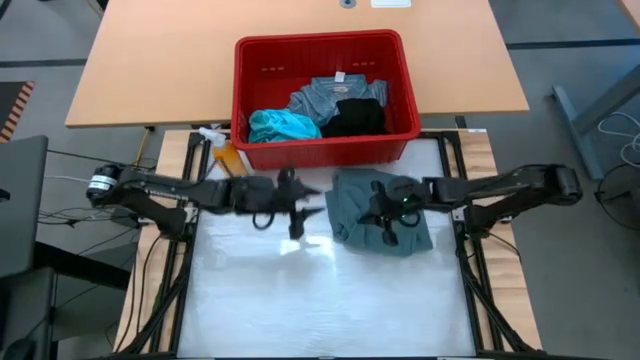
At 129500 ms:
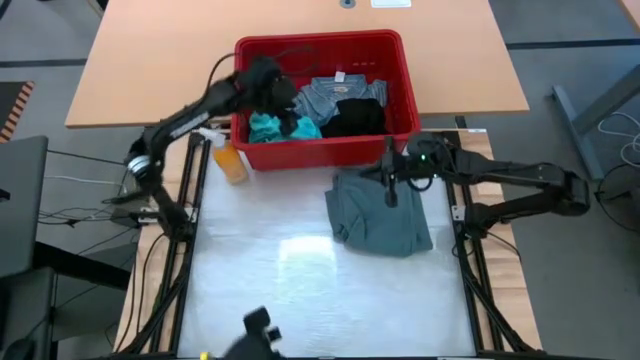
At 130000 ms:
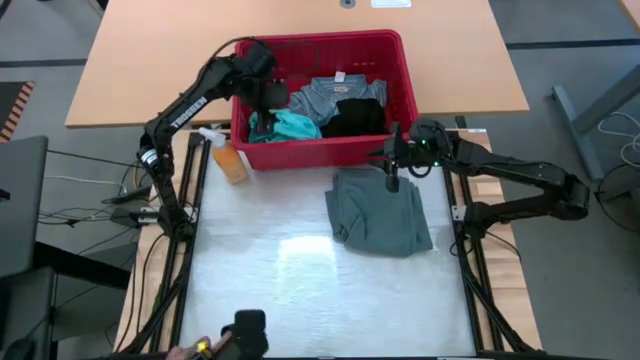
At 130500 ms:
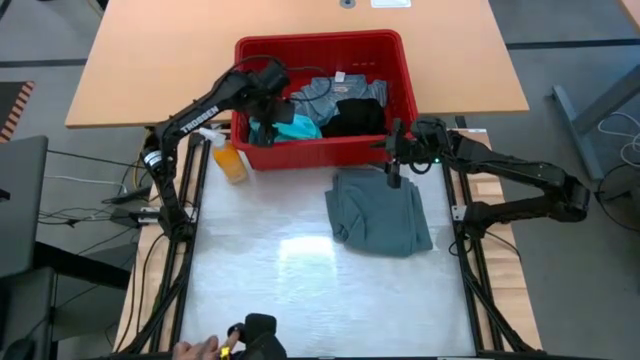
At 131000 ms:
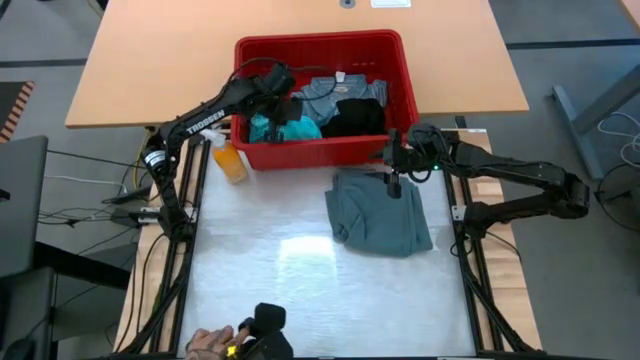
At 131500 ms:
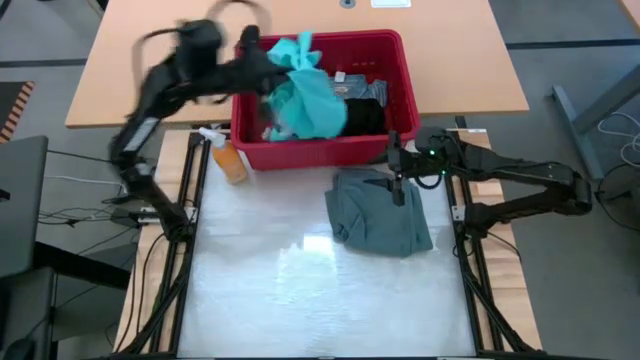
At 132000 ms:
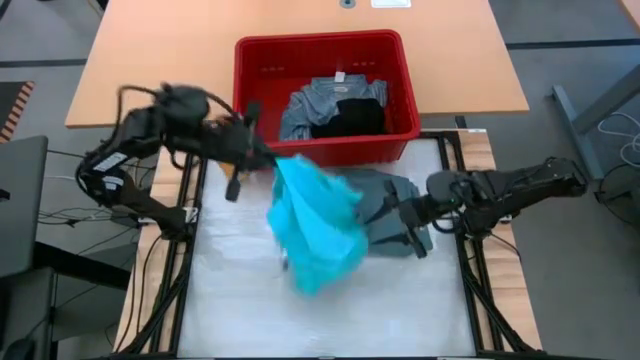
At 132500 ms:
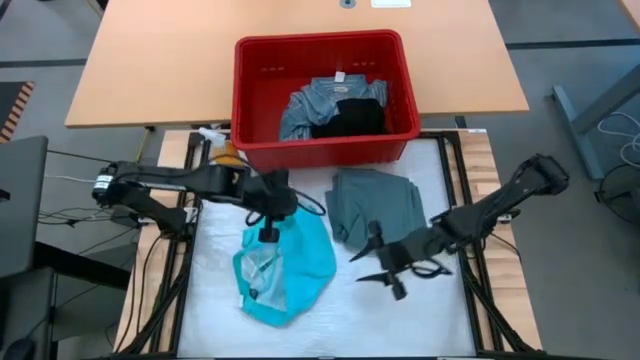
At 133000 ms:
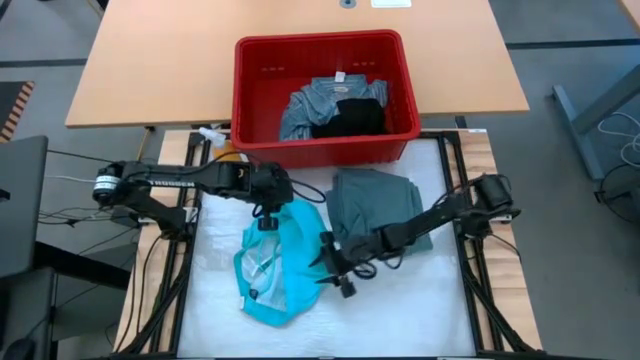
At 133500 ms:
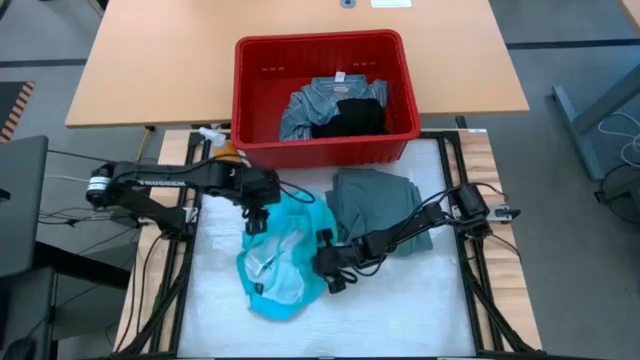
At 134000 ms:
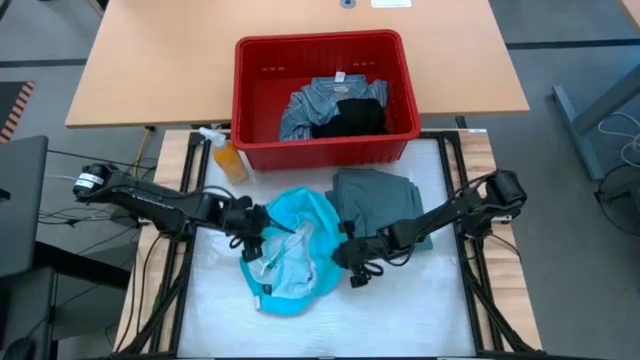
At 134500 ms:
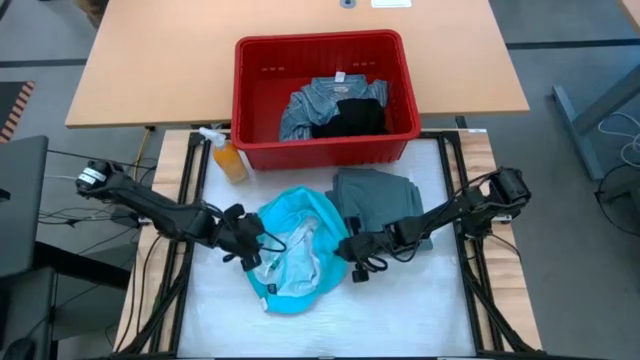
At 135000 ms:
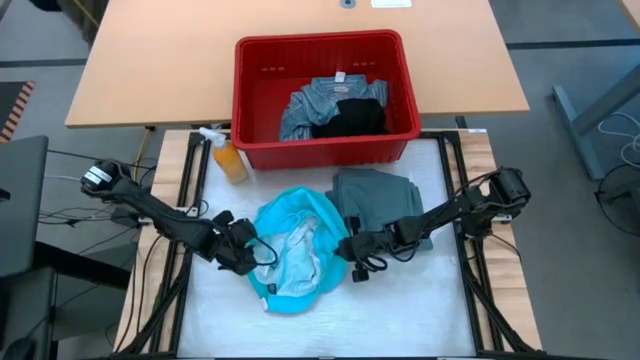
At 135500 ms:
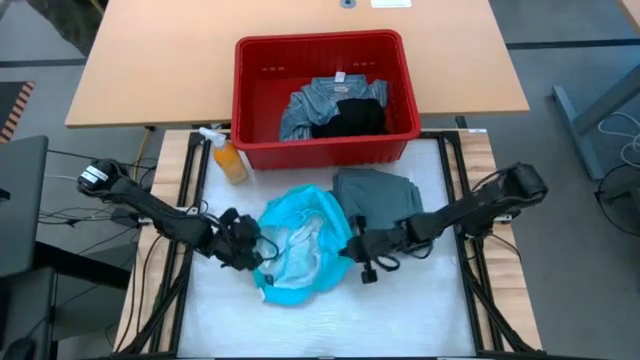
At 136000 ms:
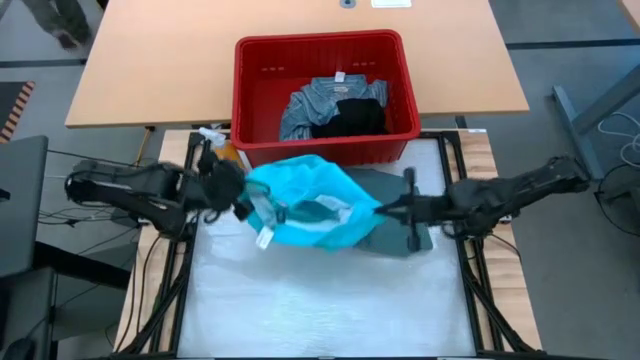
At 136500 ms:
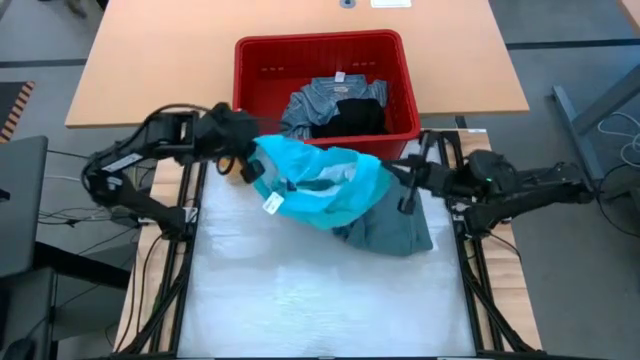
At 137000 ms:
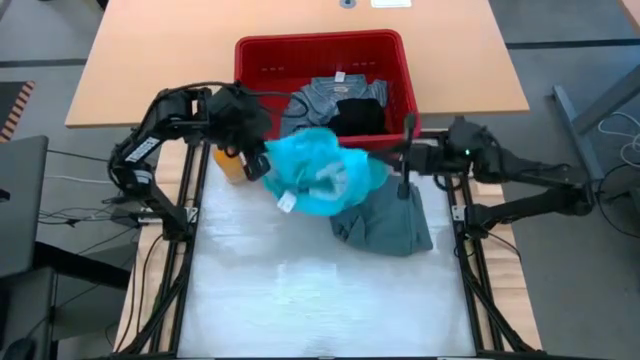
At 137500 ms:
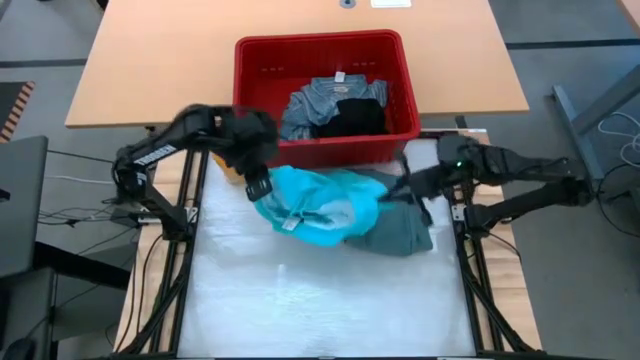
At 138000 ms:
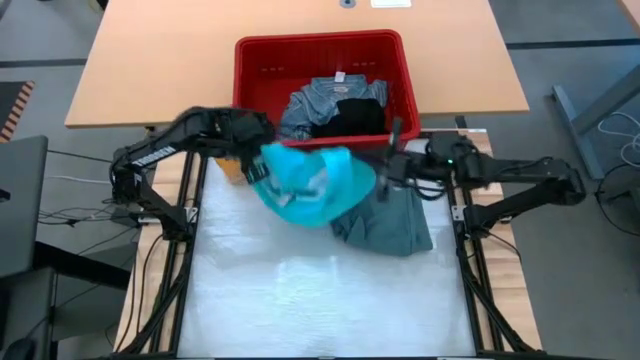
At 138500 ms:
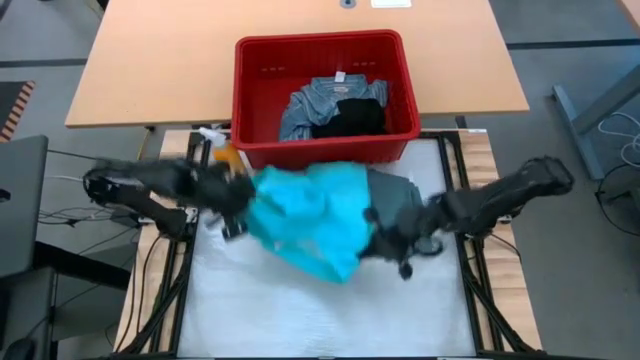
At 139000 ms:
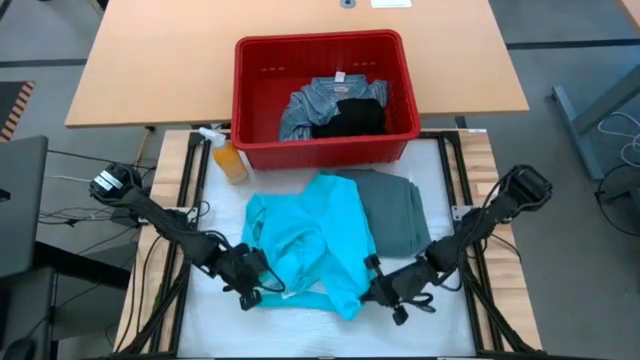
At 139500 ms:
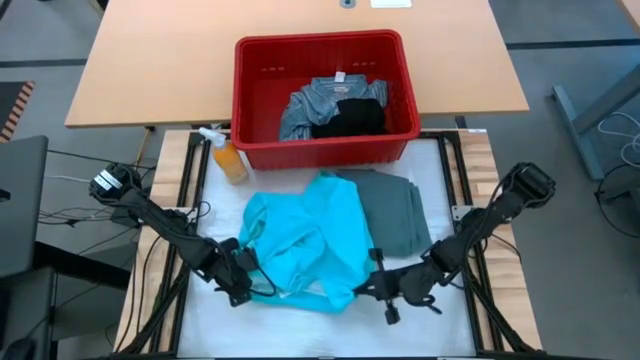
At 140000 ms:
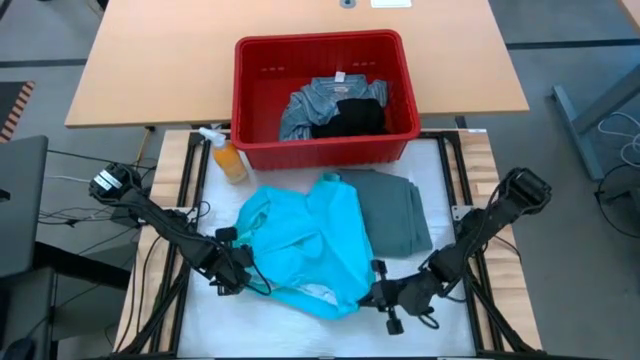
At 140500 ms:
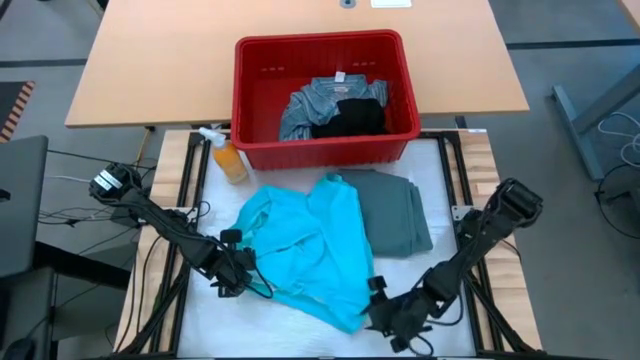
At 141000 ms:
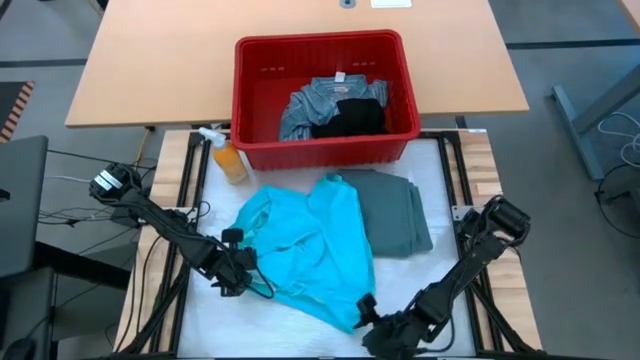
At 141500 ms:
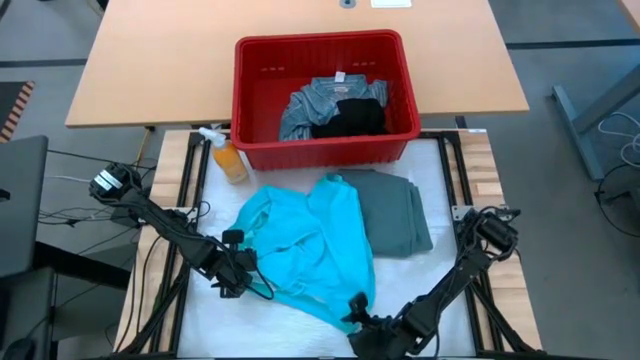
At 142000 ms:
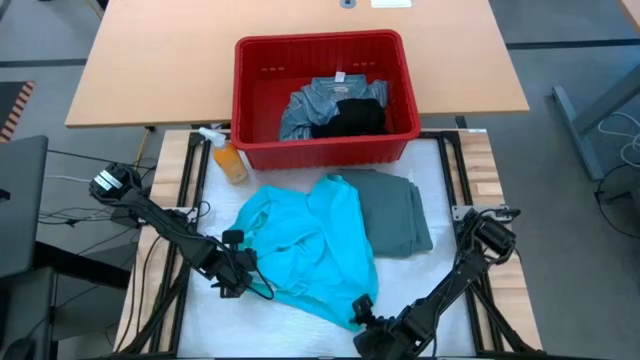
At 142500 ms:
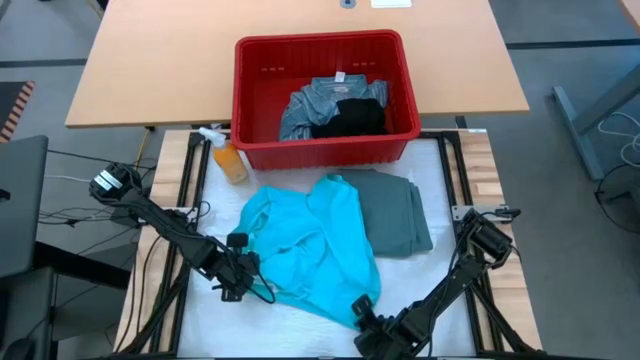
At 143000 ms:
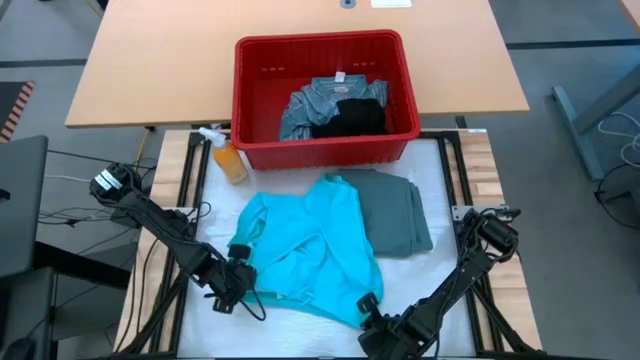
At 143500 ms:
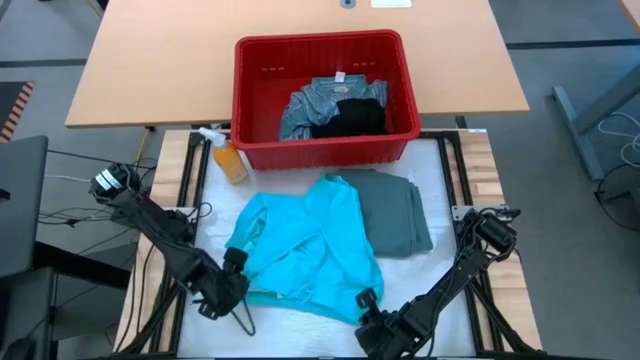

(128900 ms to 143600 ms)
Task: Fold Laundry from Bin
Remove the light blue shorts from the red bin on the table

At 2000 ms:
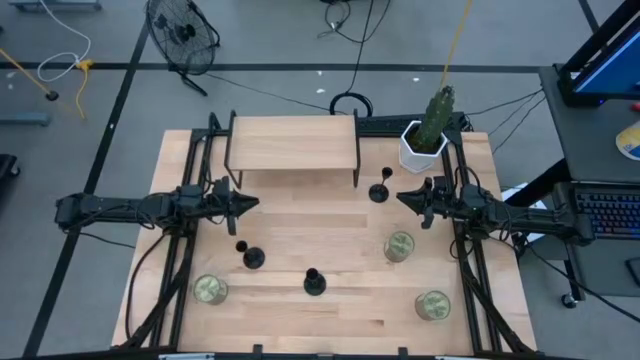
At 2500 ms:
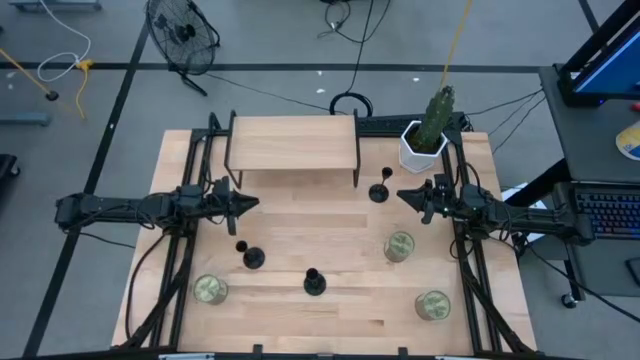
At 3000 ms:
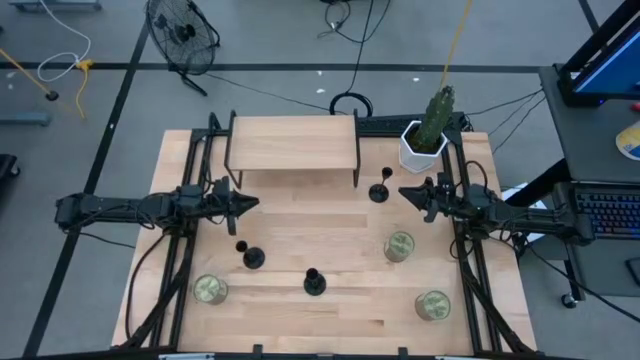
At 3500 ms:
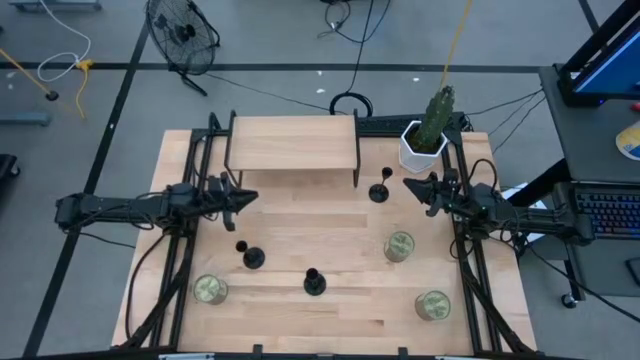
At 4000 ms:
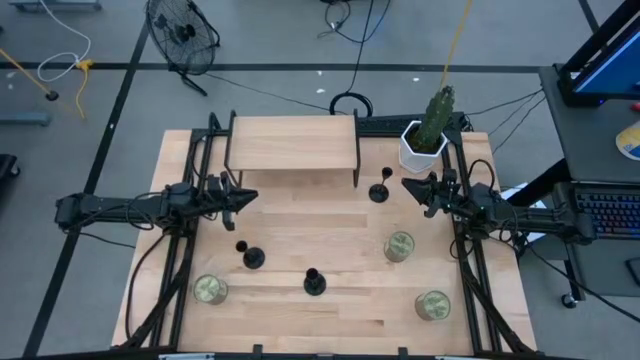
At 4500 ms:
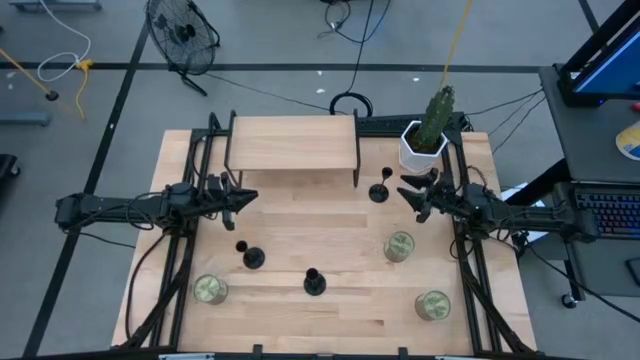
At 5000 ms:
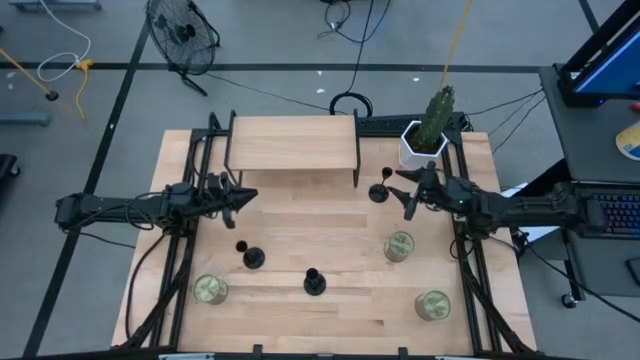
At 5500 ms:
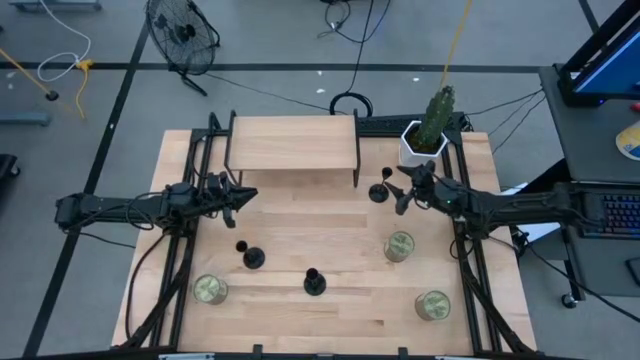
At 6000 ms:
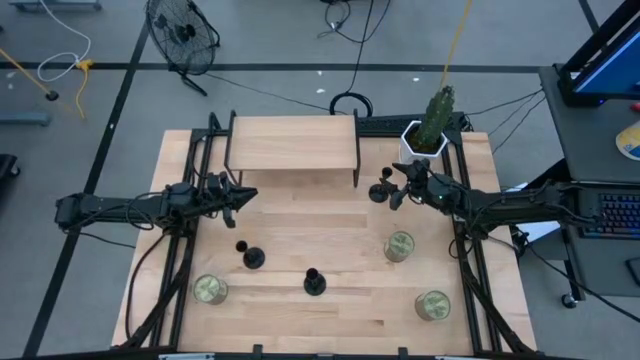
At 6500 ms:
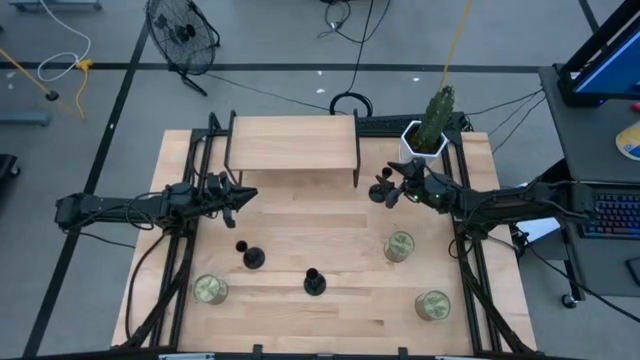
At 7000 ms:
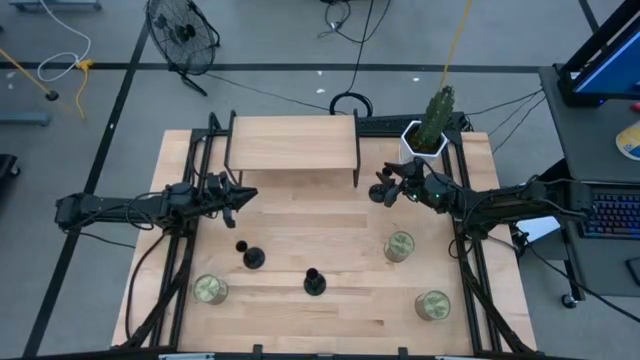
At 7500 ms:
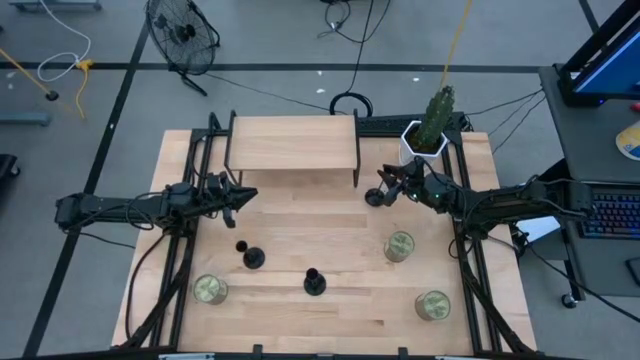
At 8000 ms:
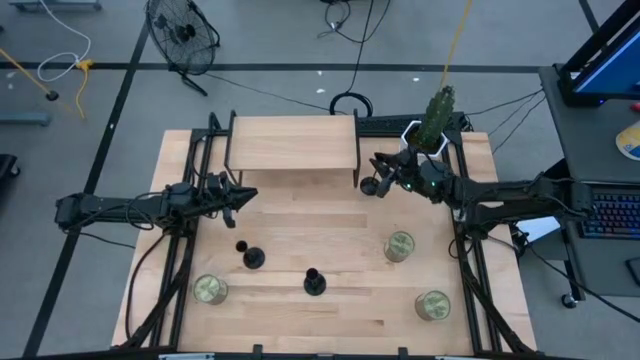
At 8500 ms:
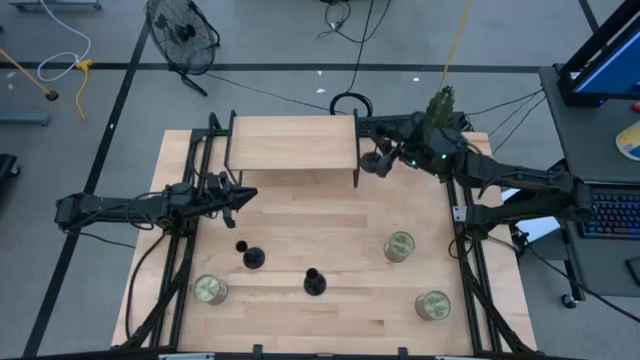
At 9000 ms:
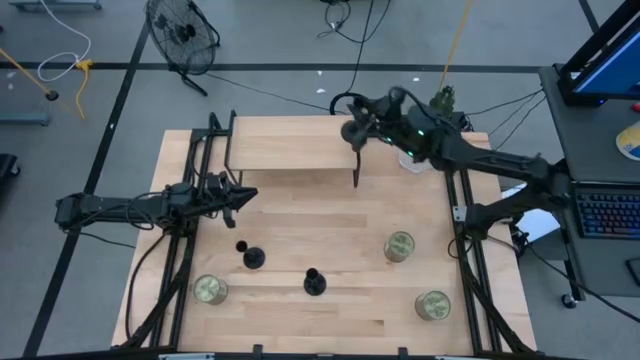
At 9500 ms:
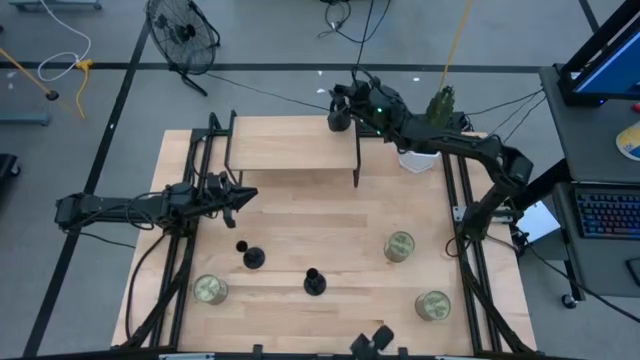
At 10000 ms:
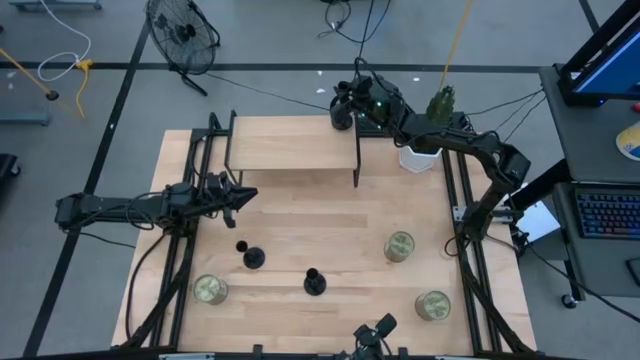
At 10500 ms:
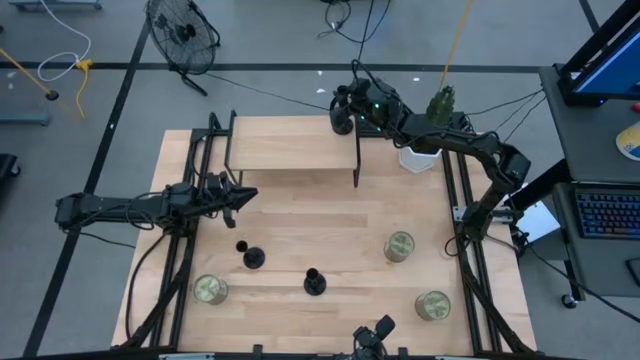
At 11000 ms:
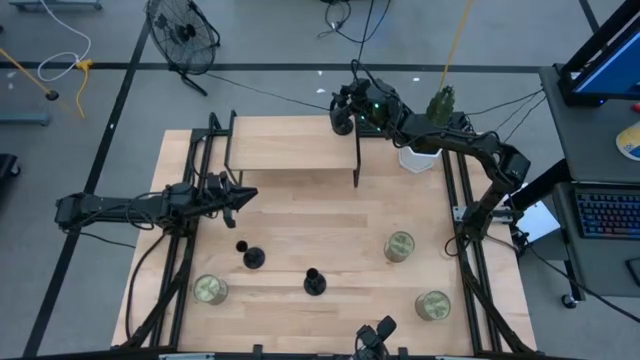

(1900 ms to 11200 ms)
Task: Pick & Place candle stick holders
Put the top candle holder on the shelf
